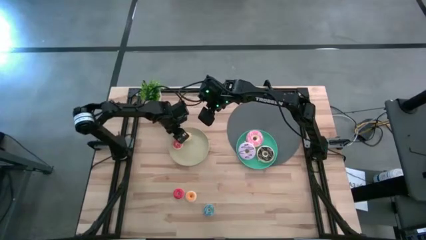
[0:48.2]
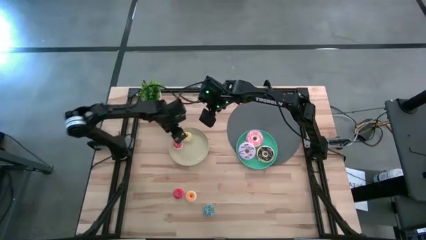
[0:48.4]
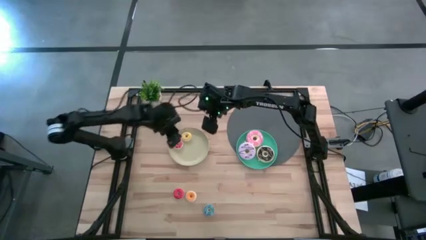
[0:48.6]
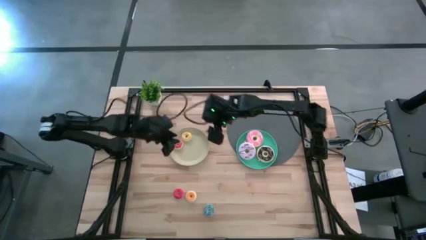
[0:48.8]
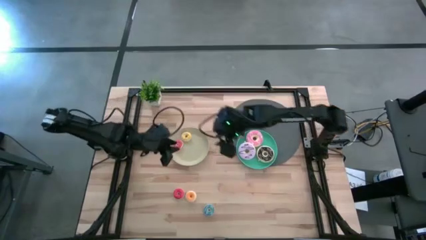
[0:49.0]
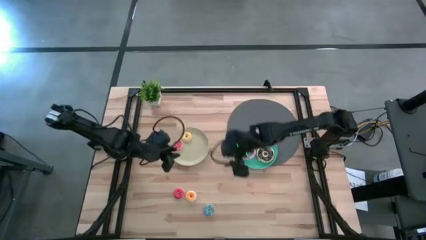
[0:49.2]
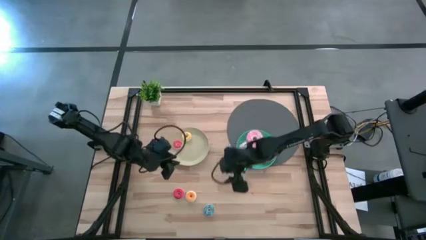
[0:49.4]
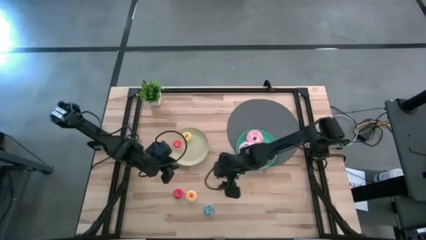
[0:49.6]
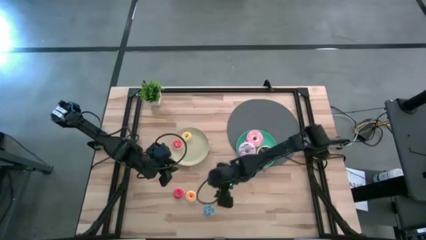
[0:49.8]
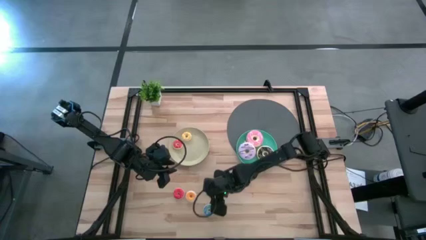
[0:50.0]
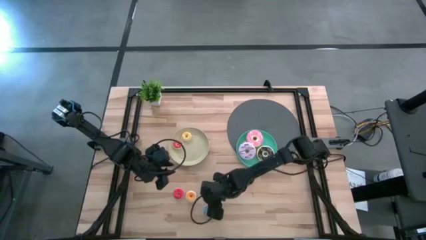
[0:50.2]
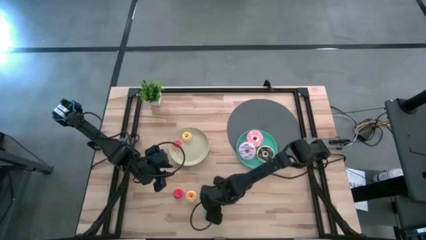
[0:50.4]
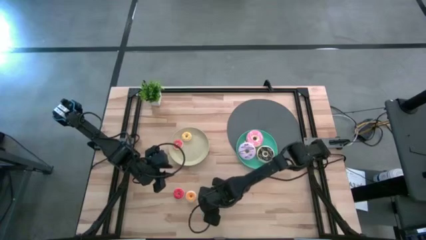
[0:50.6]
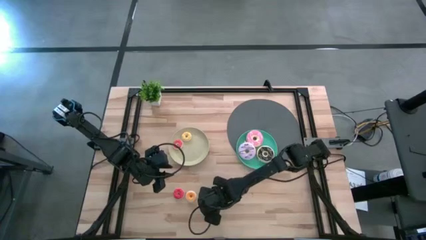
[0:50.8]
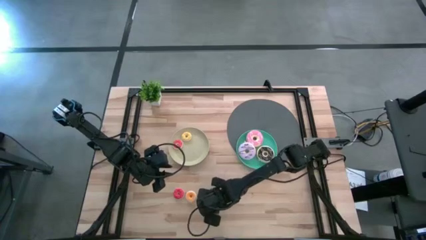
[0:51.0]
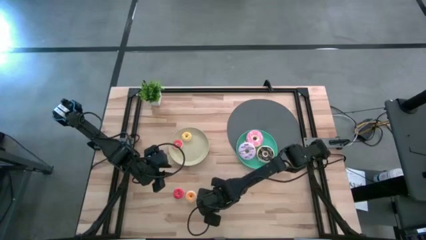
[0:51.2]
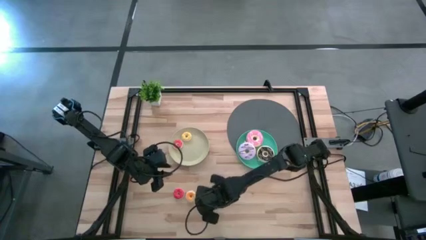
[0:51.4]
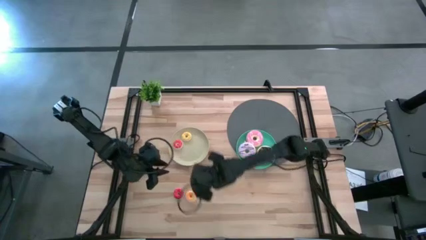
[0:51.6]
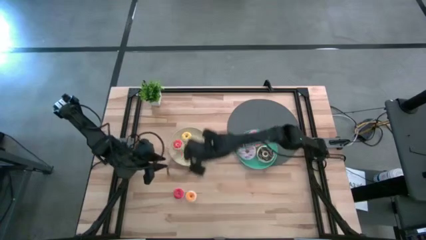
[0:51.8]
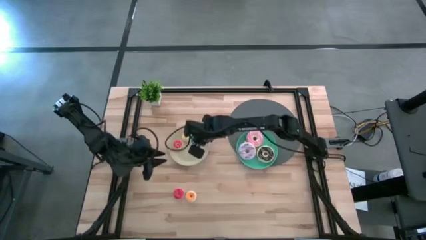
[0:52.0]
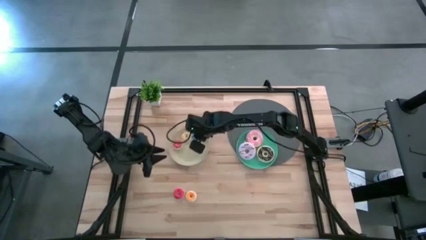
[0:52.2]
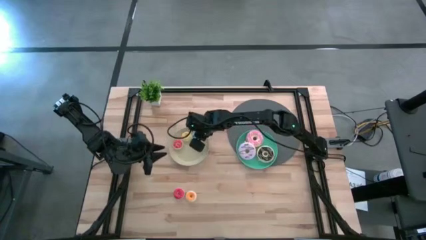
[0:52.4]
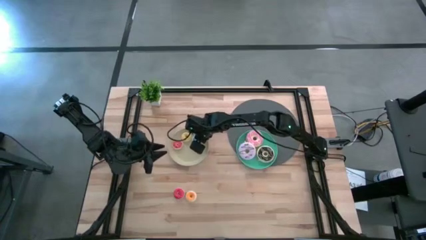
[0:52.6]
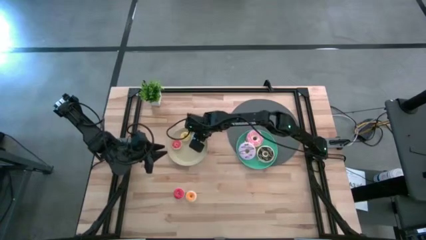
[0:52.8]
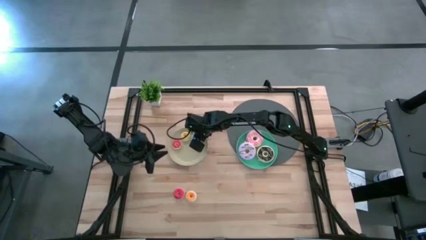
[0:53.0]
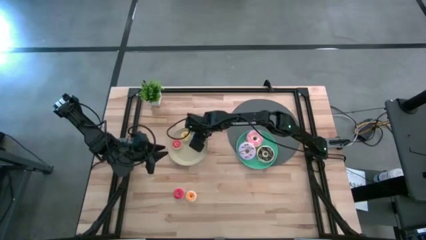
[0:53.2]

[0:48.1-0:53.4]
Task: Pick & Place donuts
Put the small blue donut on the brown plate

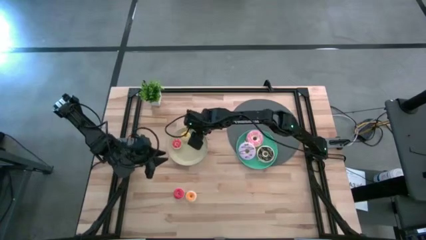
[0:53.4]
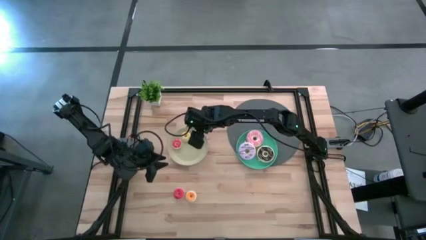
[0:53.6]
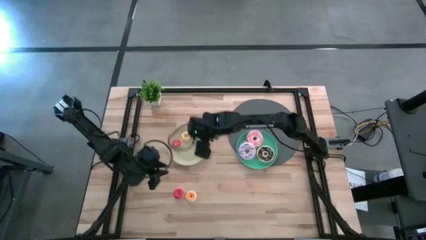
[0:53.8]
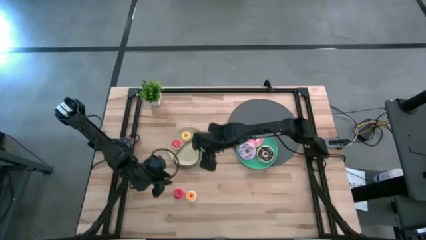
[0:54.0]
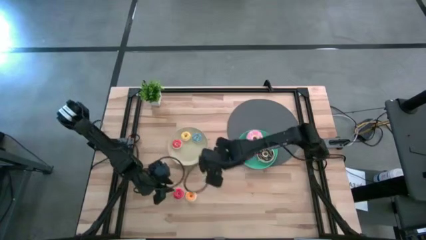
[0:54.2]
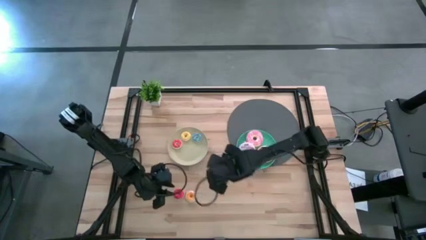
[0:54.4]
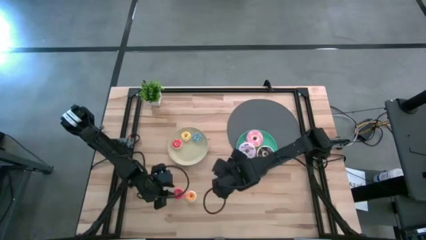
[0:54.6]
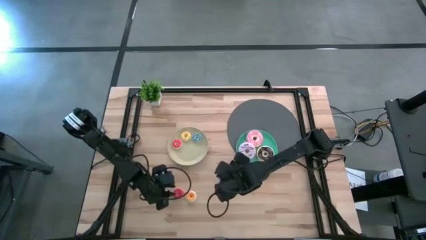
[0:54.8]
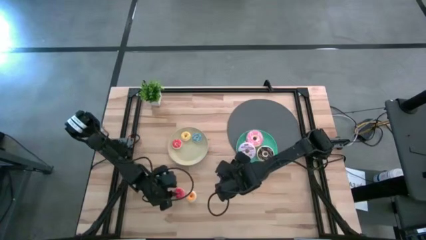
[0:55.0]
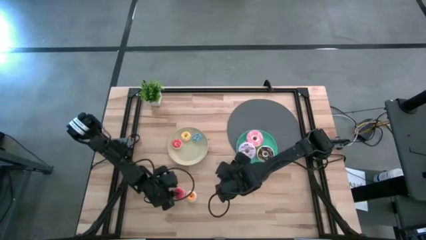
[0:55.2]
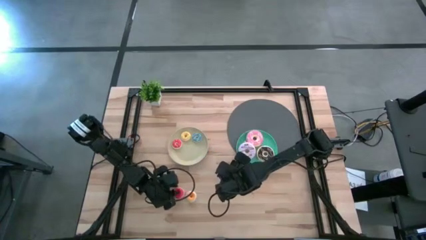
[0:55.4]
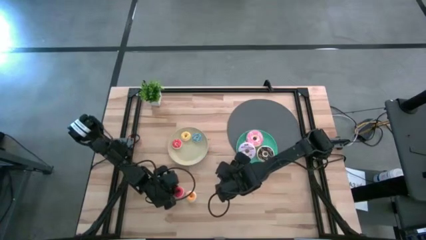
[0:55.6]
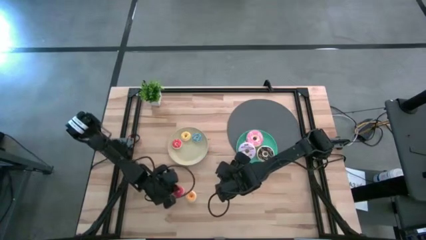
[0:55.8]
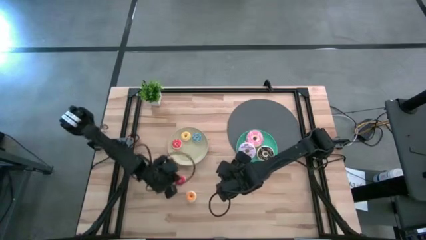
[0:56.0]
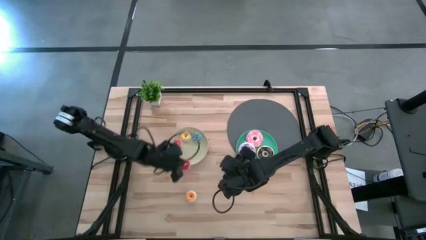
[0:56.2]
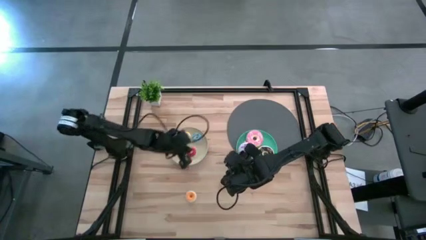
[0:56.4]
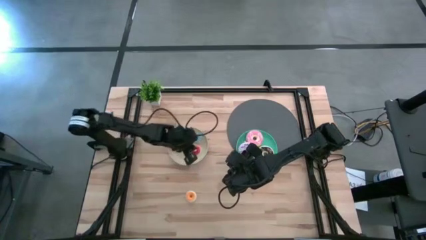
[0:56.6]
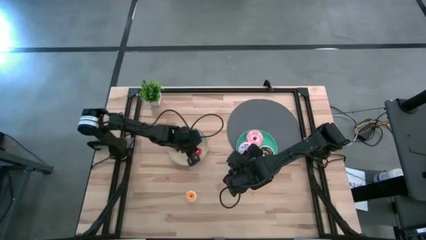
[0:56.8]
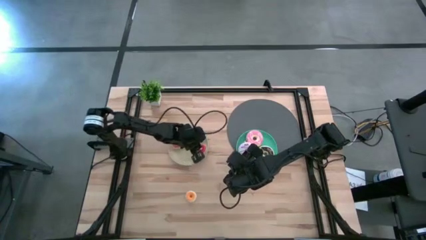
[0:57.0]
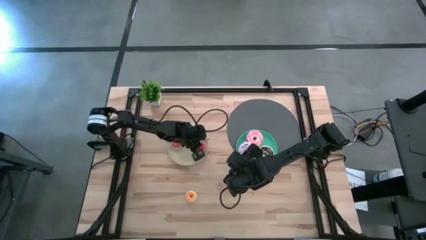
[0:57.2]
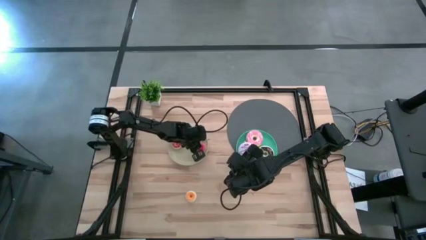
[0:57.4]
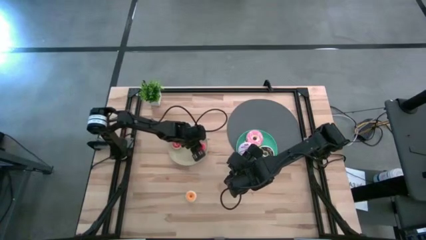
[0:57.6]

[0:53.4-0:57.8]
Put the small orange donut on the brown plate

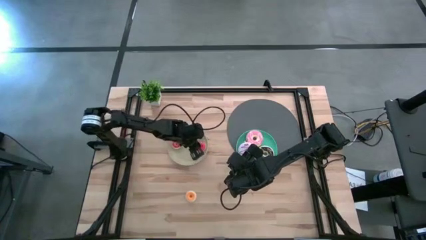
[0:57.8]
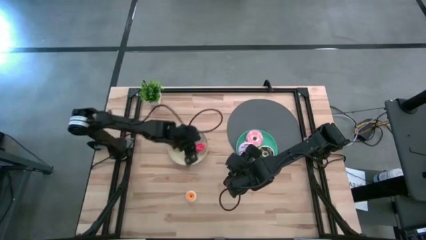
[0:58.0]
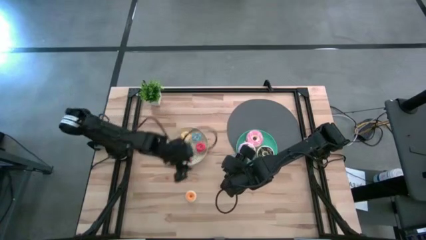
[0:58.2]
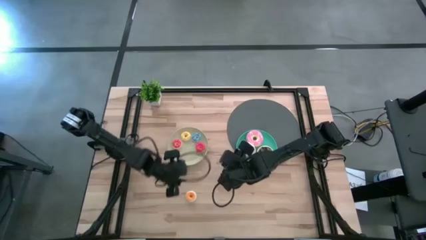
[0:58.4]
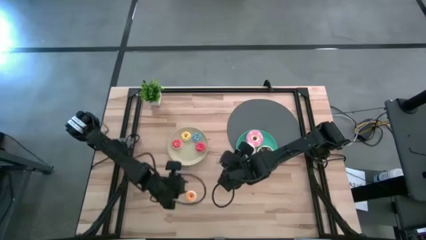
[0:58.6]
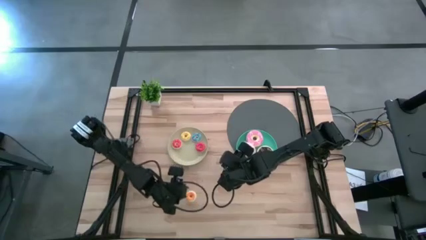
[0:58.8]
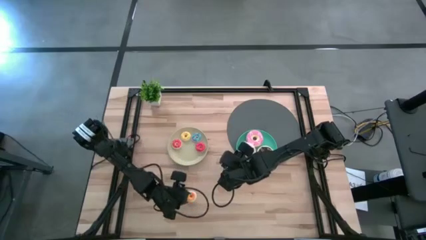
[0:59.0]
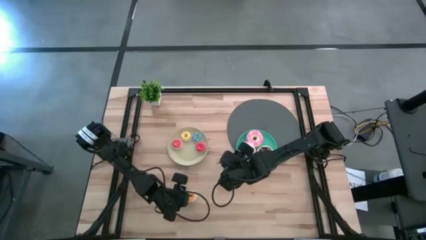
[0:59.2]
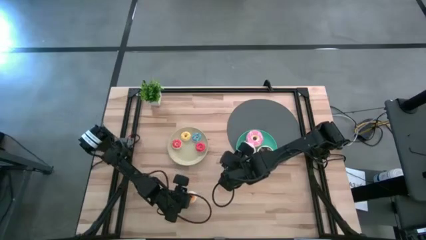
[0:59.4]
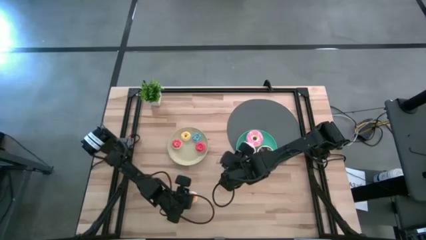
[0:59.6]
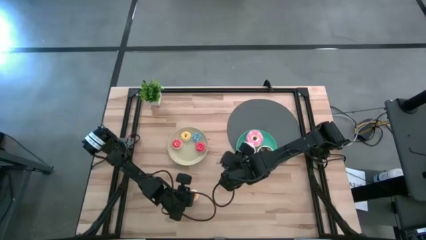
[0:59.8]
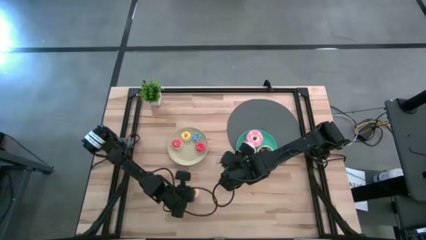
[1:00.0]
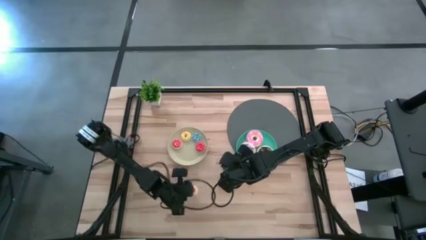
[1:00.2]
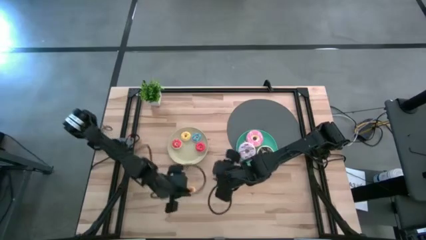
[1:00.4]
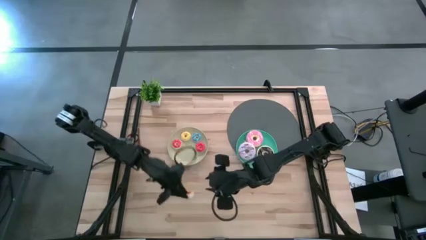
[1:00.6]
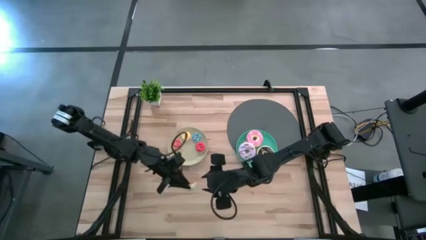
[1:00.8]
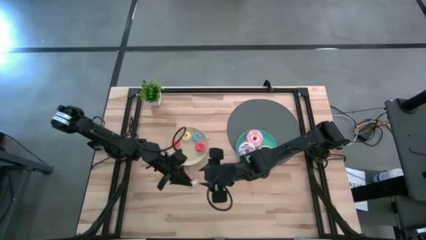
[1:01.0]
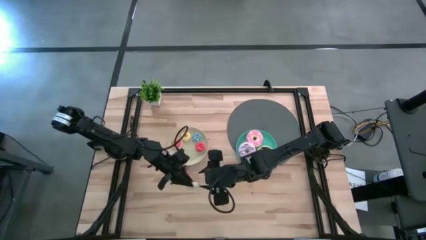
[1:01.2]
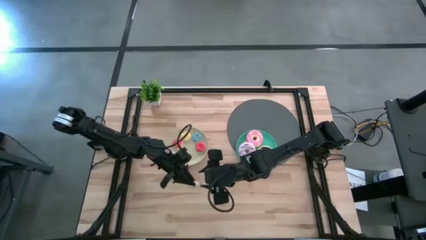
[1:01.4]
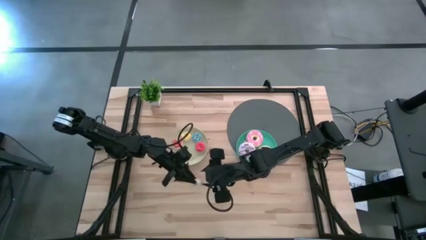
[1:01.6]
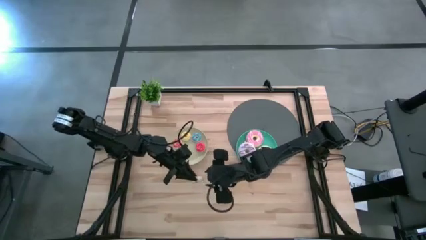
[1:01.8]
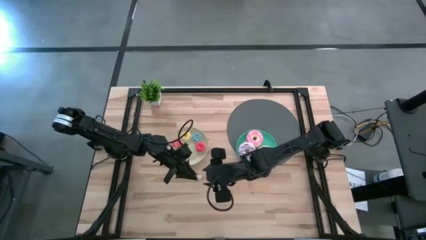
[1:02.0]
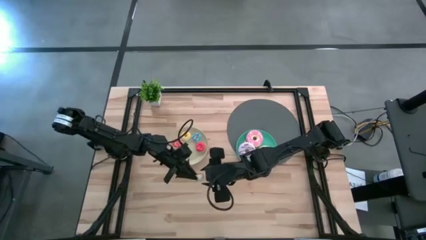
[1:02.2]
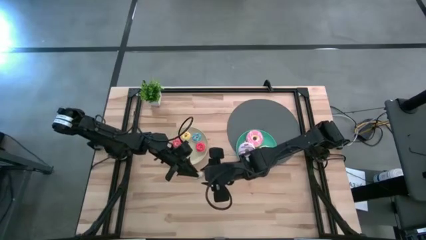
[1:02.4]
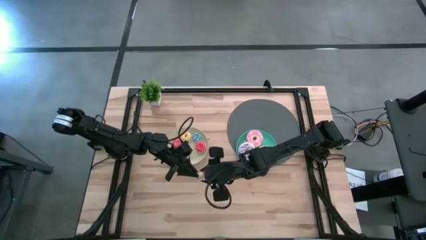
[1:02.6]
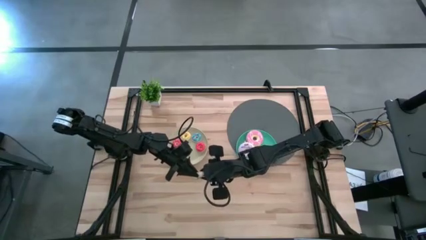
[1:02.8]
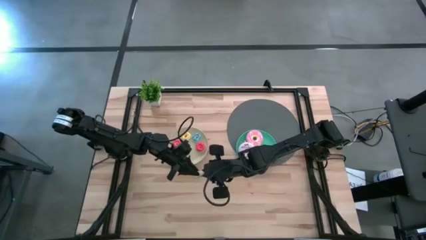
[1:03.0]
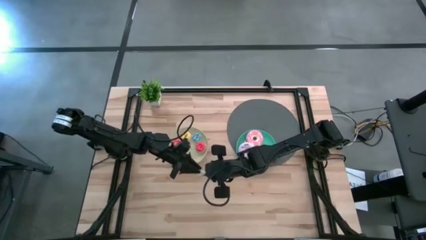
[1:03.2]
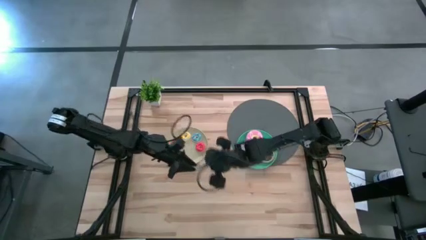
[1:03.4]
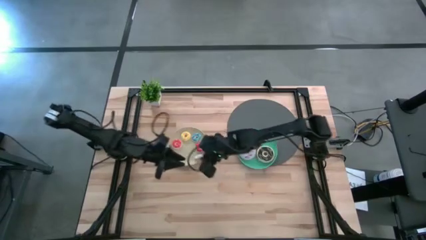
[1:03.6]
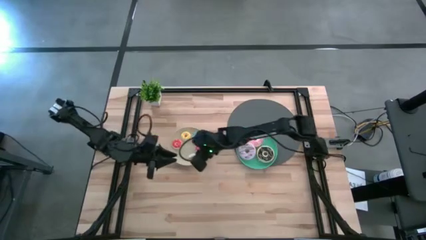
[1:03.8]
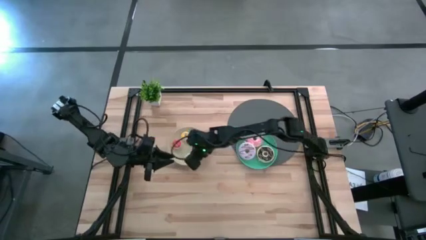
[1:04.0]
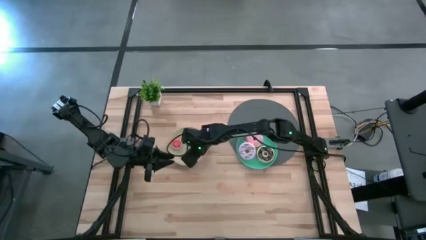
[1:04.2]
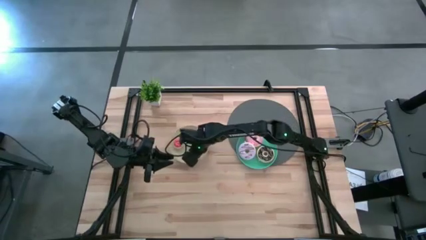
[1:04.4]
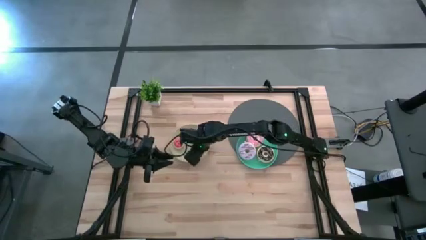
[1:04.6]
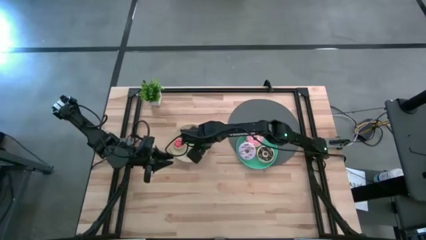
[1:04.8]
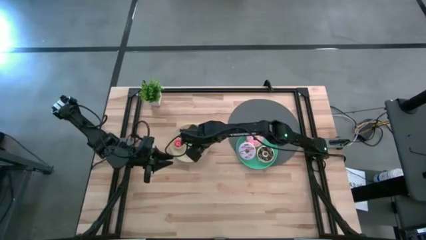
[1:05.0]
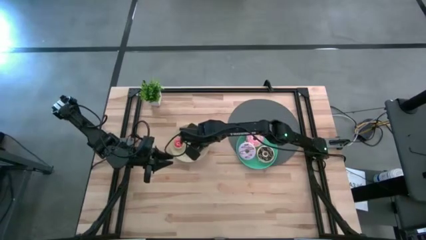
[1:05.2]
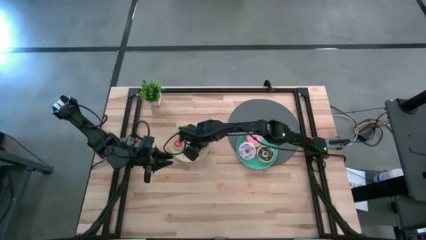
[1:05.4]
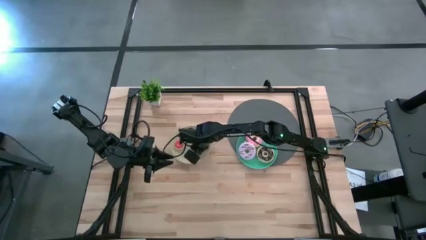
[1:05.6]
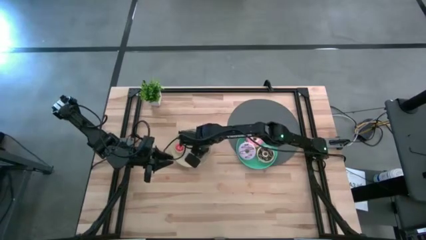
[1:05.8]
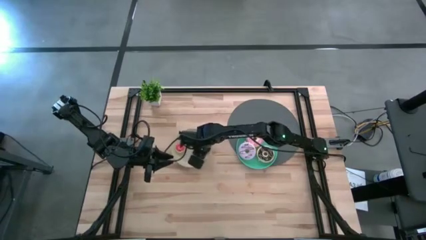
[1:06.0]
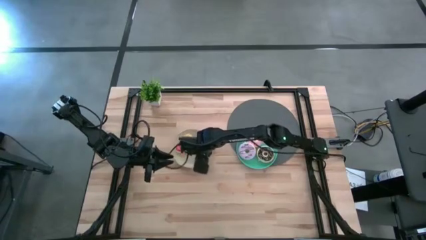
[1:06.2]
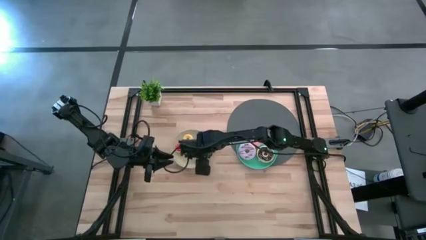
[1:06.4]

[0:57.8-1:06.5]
Put the small white donut on the brown plate
